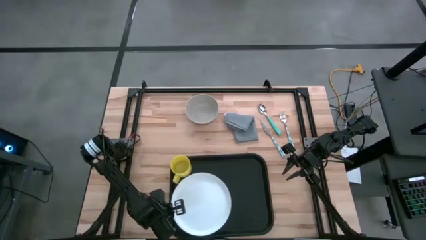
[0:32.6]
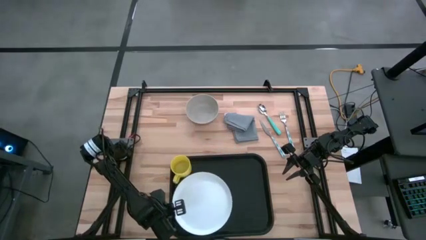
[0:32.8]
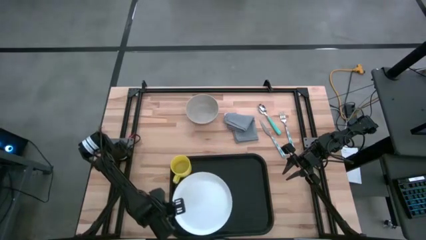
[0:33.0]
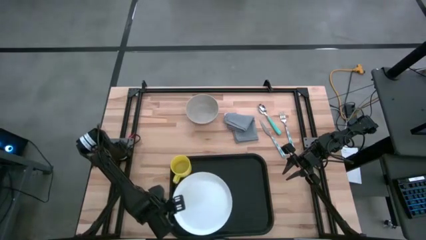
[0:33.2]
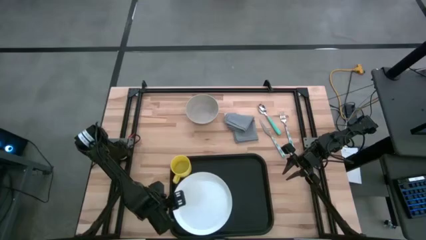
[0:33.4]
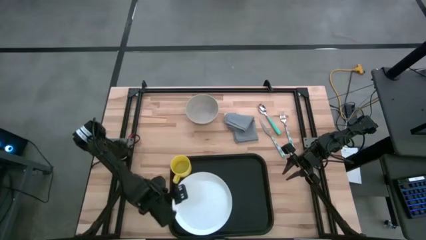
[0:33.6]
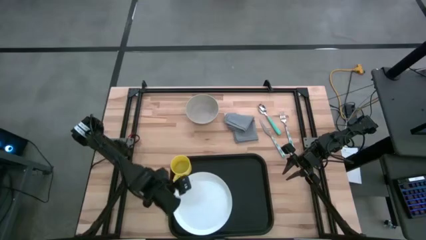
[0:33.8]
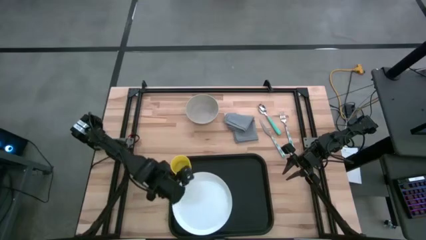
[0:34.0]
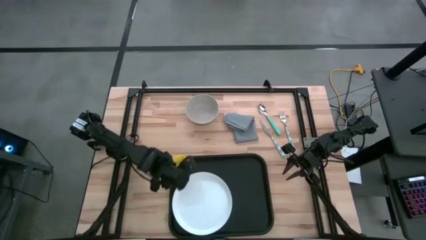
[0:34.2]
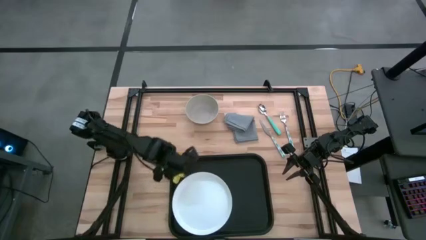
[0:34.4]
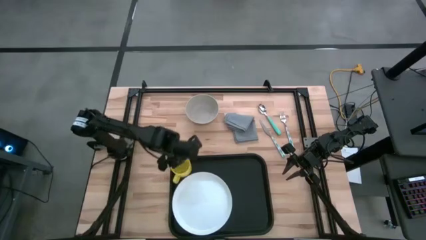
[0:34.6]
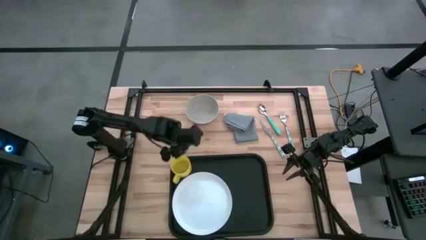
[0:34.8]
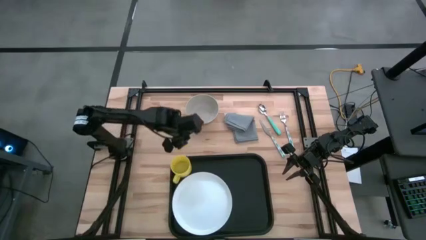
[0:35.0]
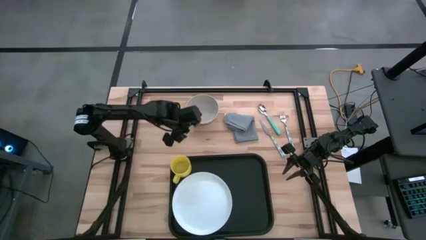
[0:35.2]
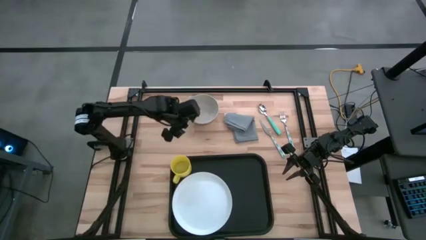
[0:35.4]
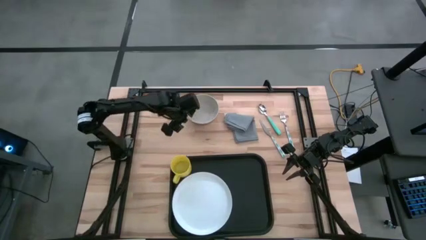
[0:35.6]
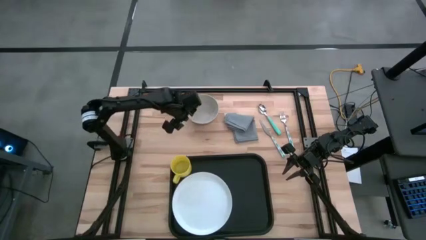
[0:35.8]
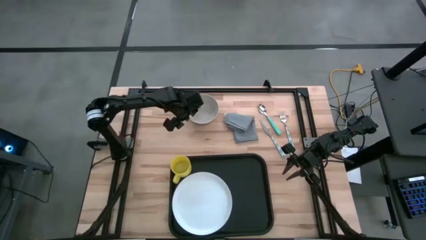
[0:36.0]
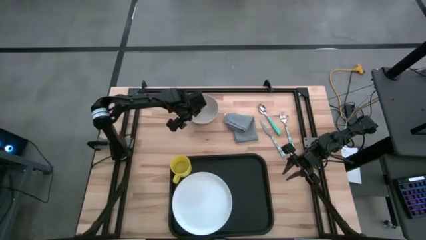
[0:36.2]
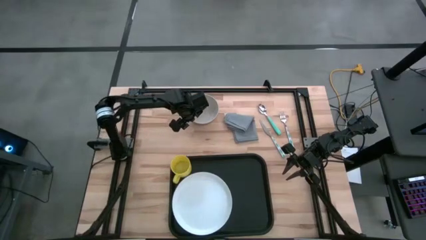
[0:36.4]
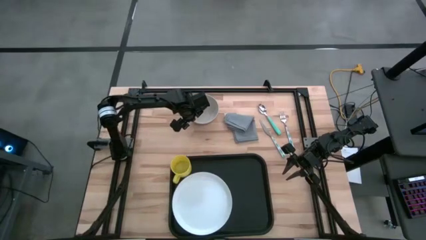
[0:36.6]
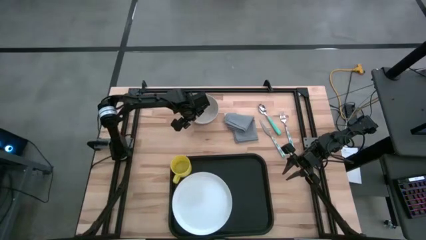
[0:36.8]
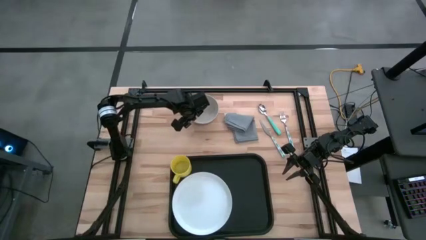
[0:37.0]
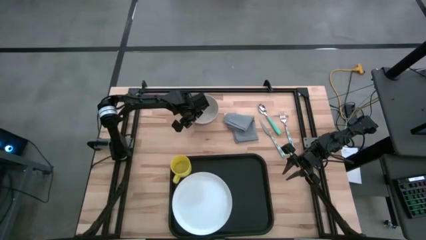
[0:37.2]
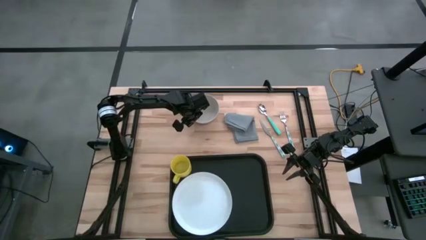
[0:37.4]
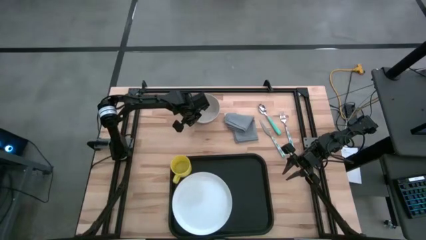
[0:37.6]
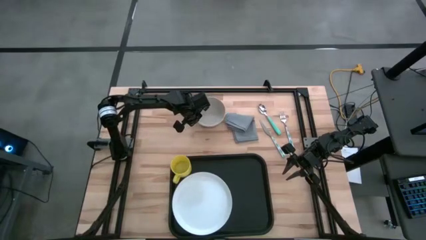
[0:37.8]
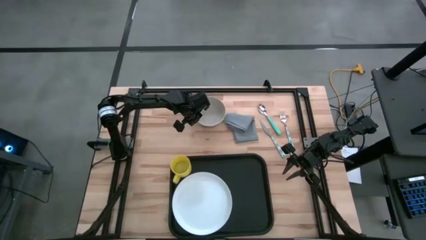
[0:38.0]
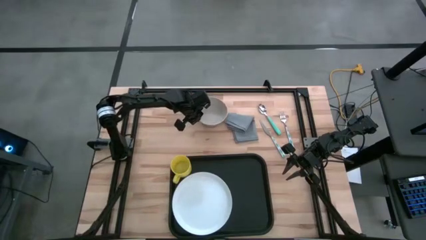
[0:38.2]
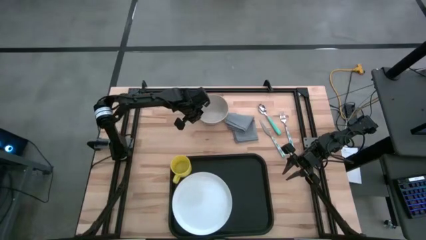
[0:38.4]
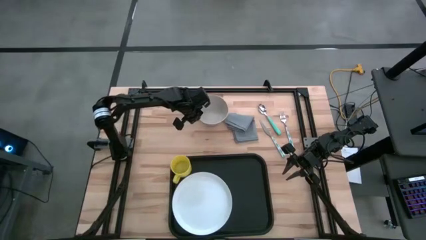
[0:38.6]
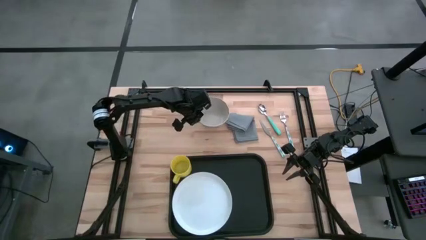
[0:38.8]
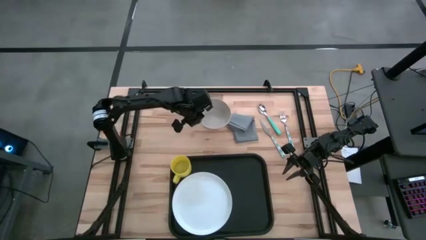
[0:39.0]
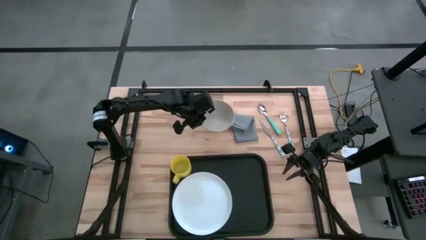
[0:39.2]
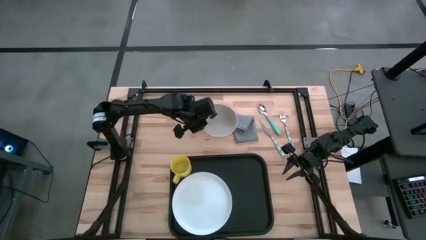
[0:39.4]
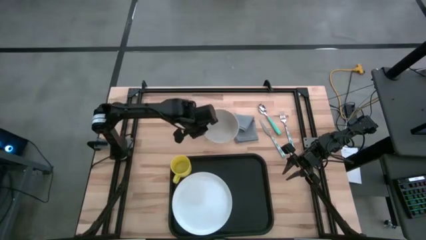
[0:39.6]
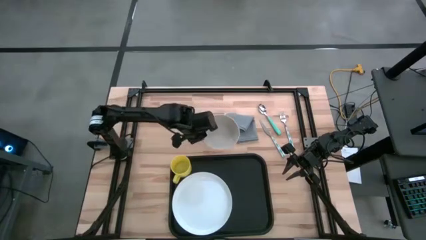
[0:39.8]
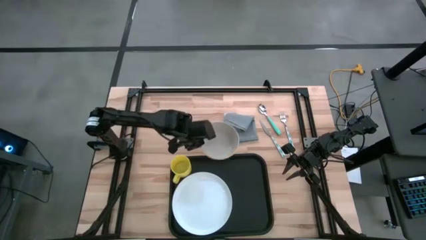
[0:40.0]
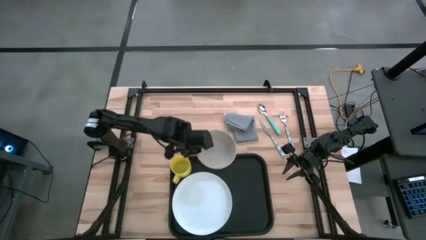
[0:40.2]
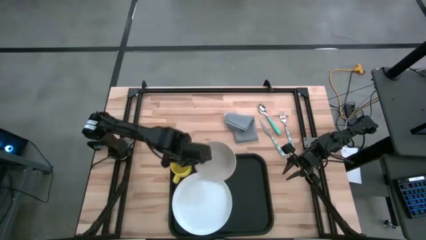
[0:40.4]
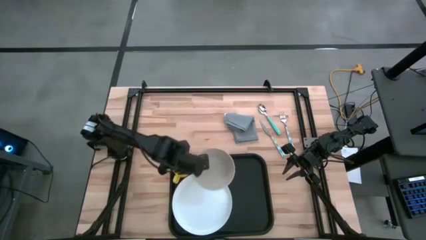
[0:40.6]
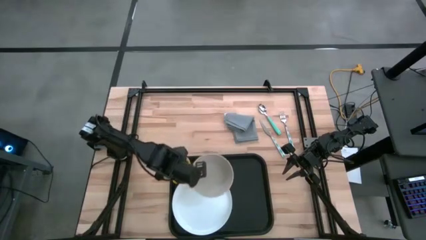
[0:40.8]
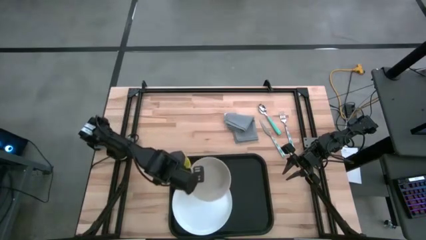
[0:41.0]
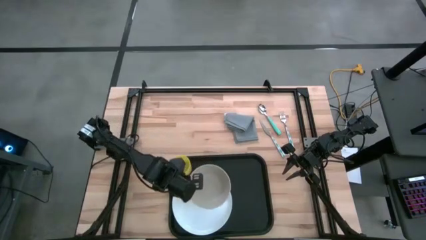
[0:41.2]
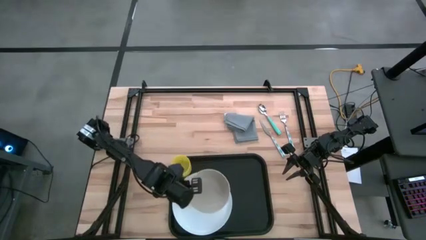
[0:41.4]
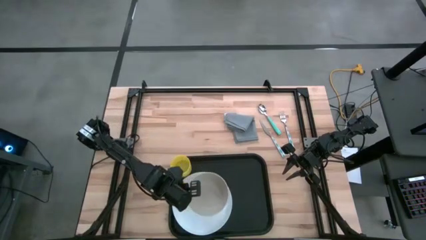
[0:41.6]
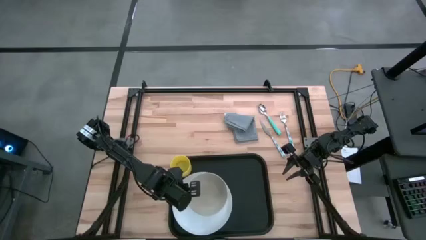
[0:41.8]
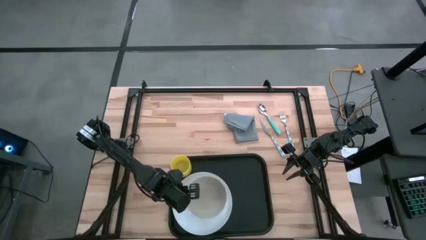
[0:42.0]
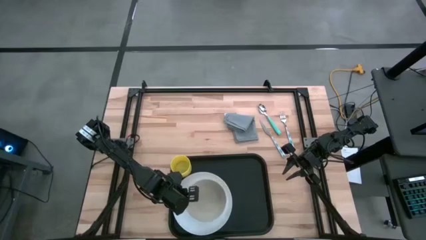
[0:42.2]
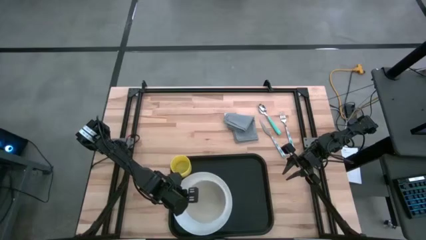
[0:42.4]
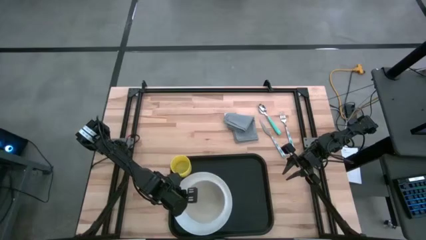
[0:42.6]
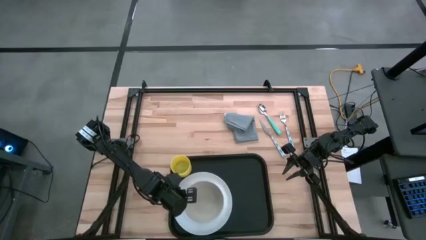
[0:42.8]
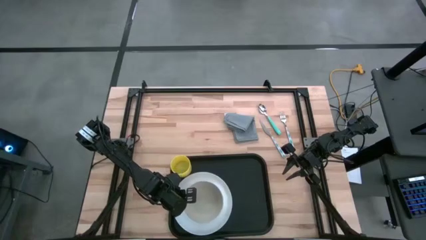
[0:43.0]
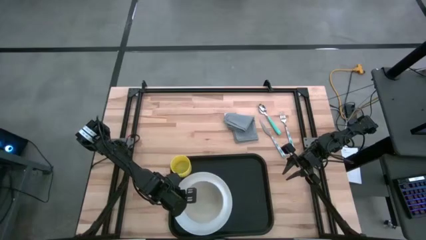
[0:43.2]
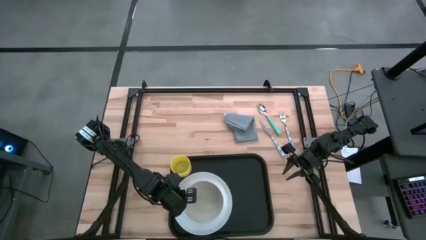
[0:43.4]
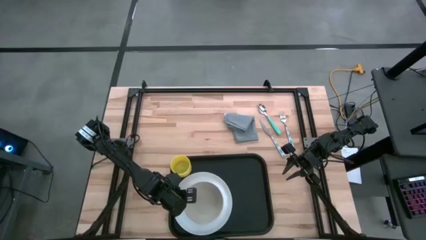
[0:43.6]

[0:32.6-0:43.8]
Task: Set up tray
Put the gray bowl under the yellow mug on the white plate on the black serving tray

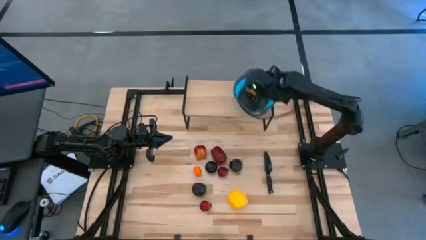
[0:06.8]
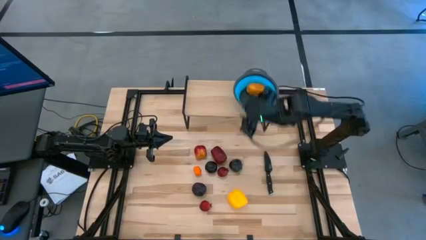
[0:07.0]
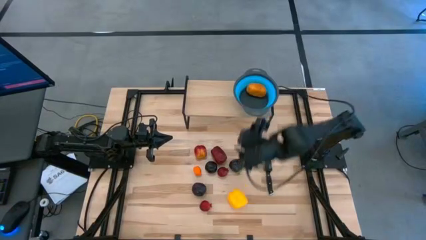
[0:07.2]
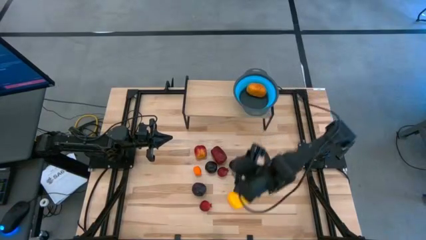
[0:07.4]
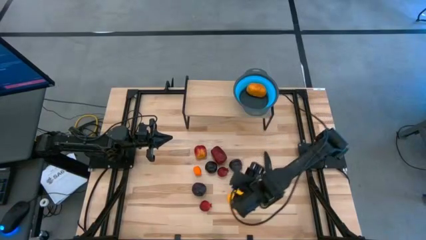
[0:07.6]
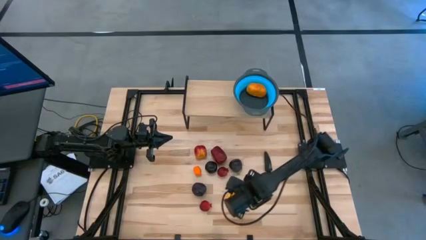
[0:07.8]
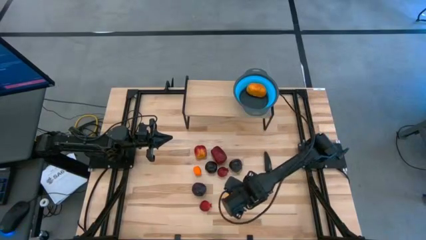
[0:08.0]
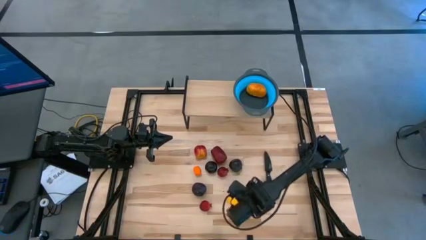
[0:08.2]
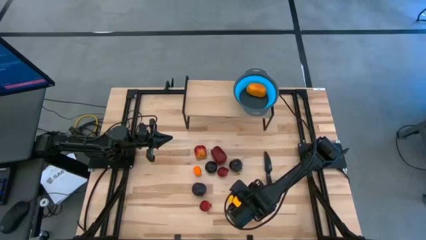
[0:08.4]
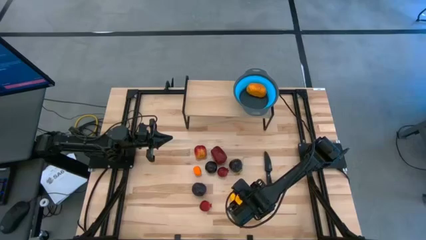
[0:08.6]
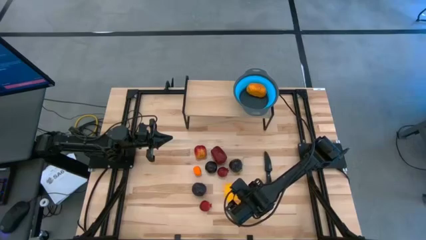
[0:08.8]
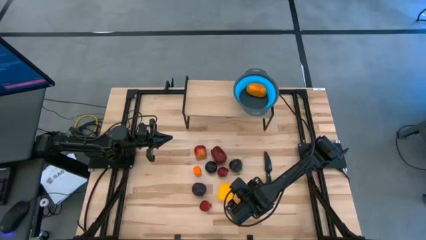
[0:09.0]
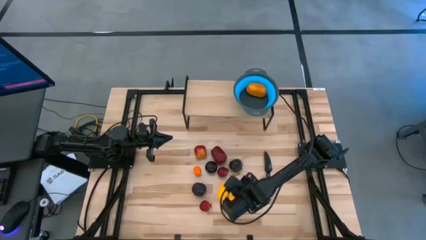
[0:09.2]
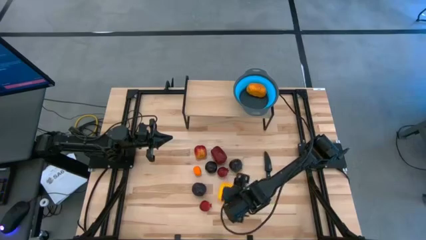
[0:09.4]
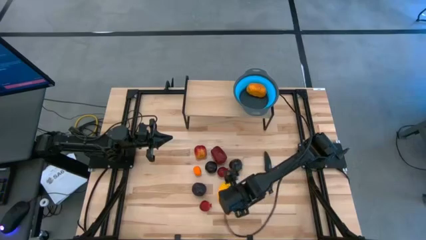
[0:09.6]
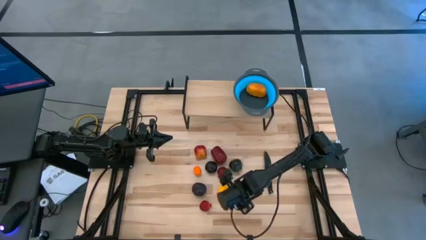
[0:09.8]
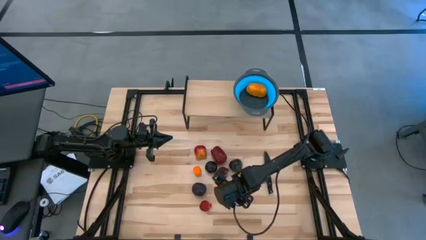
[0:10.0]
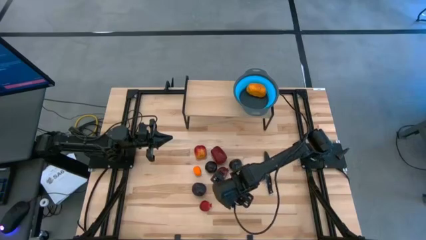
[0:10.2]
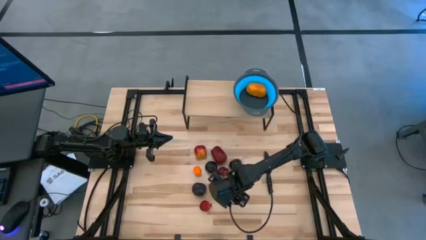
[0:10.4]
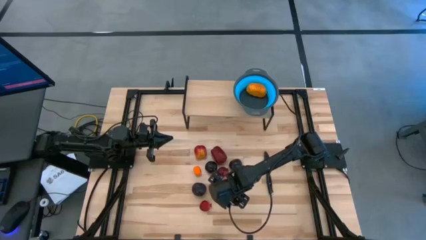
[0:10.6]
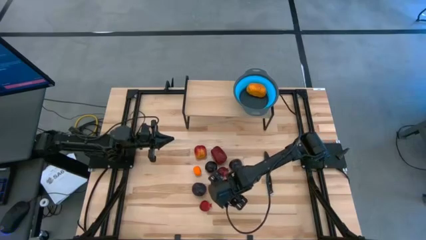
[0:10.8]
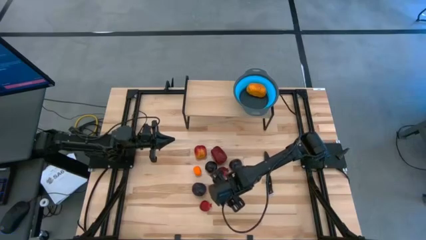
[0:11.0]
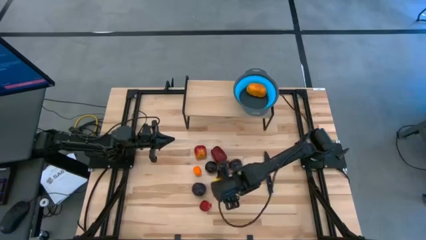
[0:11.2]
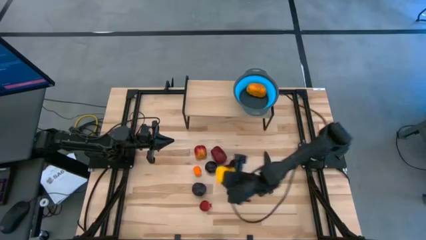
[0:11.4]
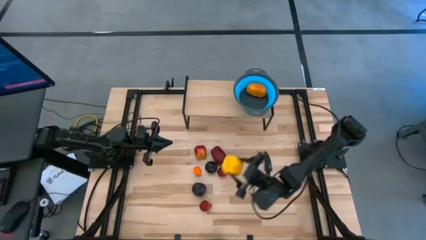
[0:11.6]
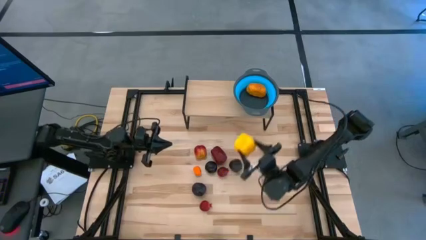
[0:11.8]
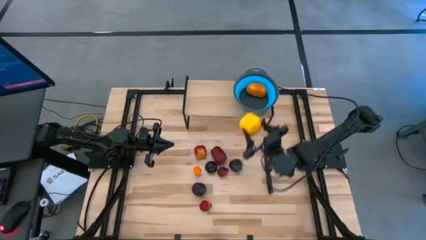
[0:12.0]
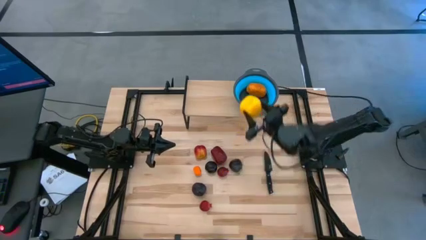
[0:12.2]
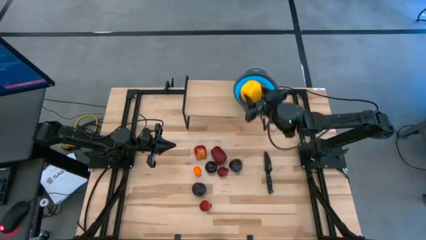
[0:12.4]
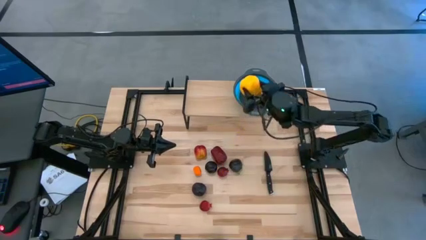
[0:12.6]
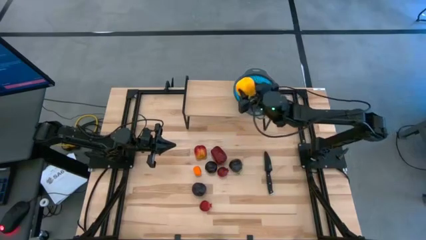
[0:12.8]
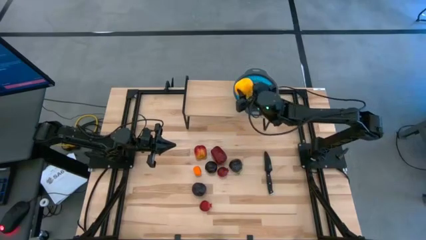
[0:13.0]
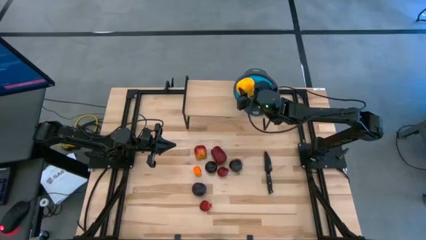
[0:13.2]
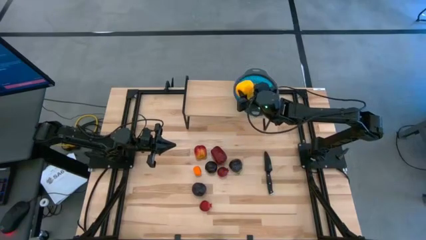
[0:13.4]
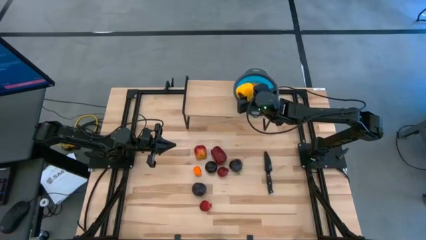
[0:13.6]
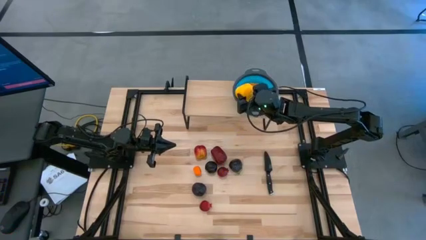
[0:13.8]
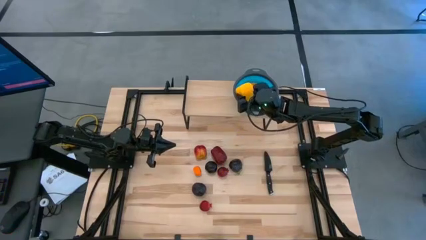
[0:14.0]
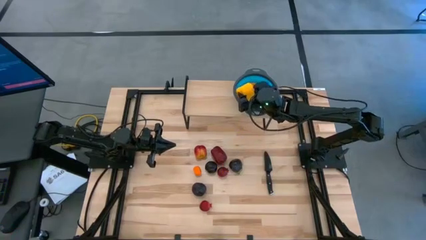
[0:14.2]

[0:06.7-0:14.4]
Task: Pick & Place Fruit
Put the yellow bell pepper into the strainer bowl
